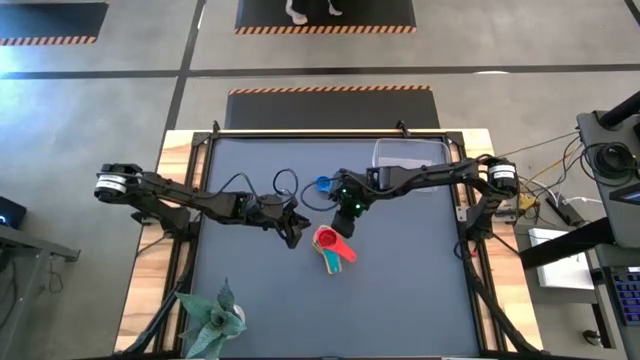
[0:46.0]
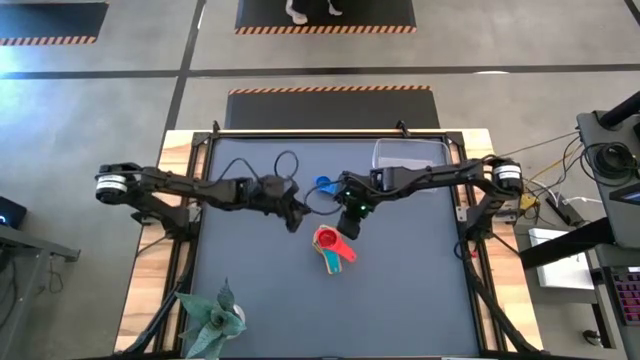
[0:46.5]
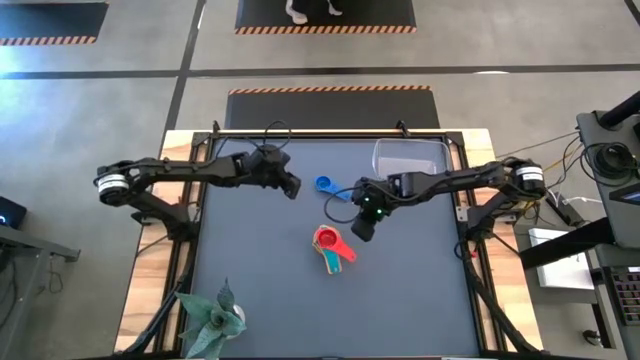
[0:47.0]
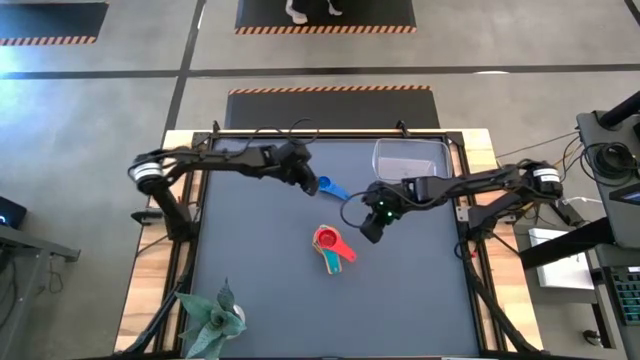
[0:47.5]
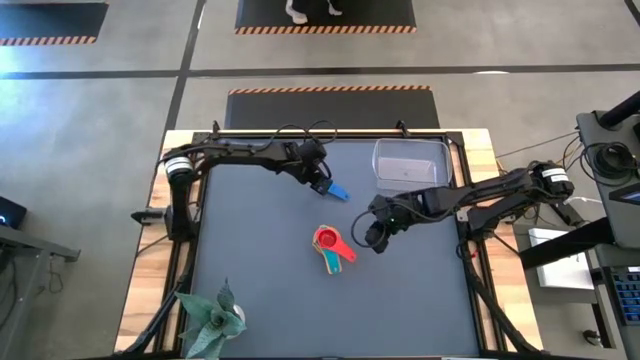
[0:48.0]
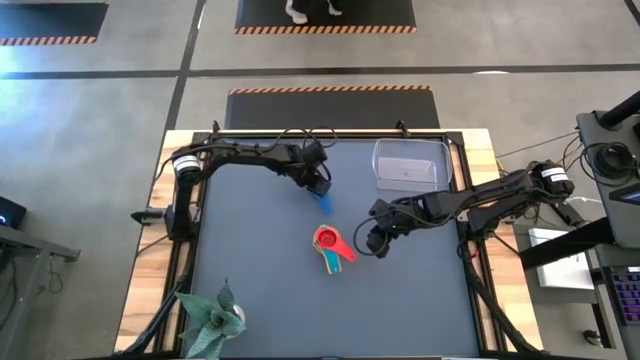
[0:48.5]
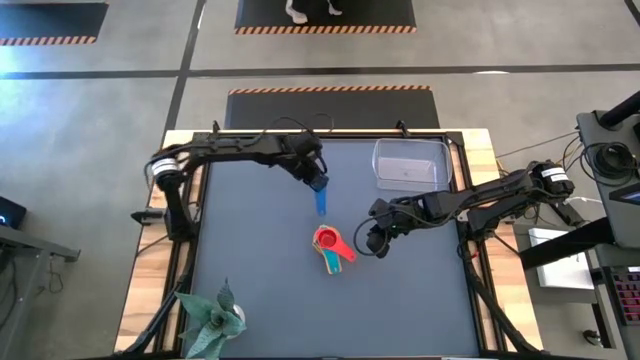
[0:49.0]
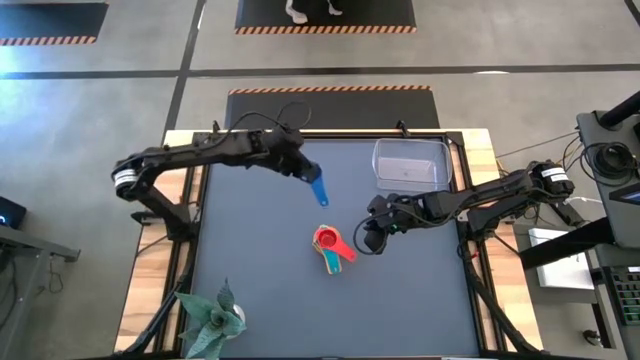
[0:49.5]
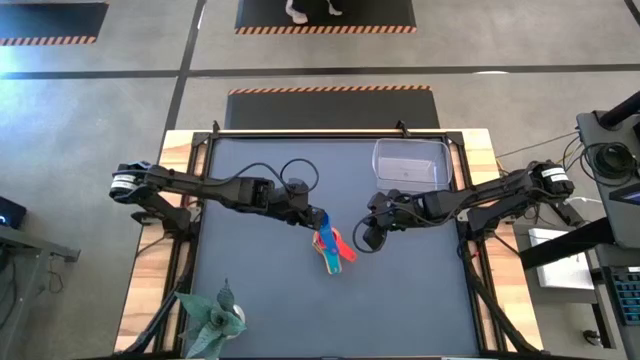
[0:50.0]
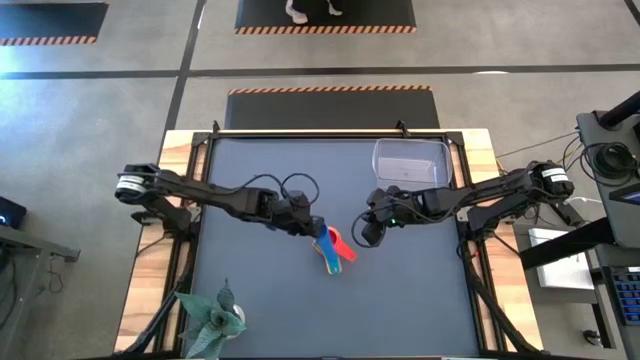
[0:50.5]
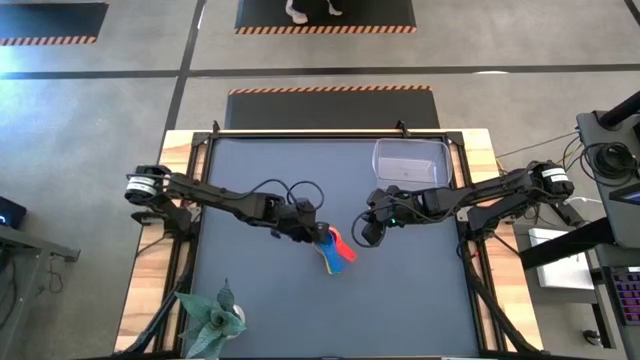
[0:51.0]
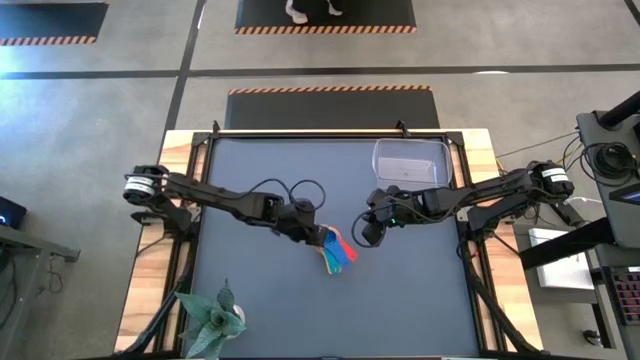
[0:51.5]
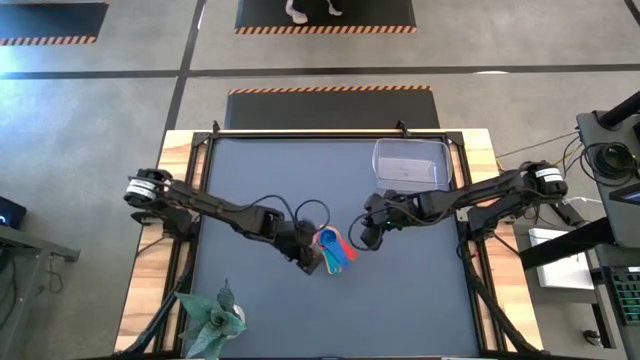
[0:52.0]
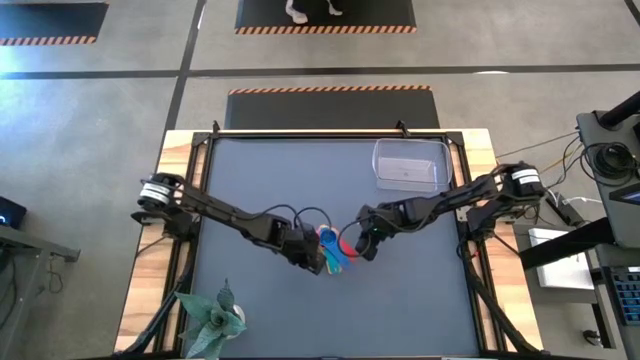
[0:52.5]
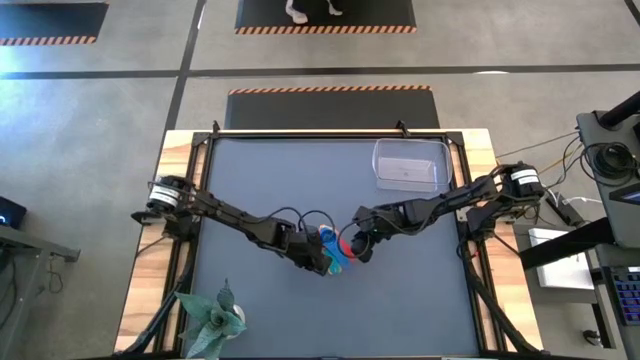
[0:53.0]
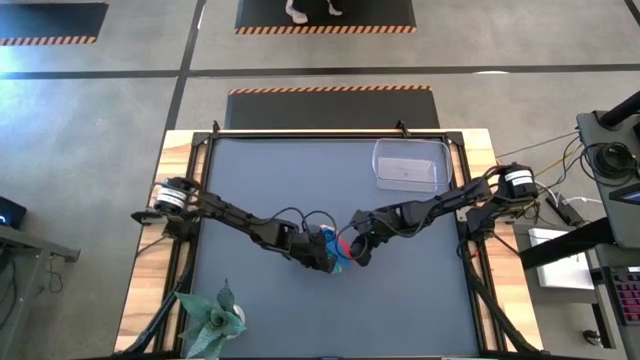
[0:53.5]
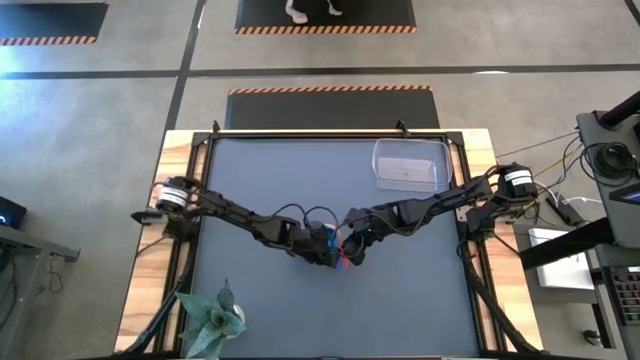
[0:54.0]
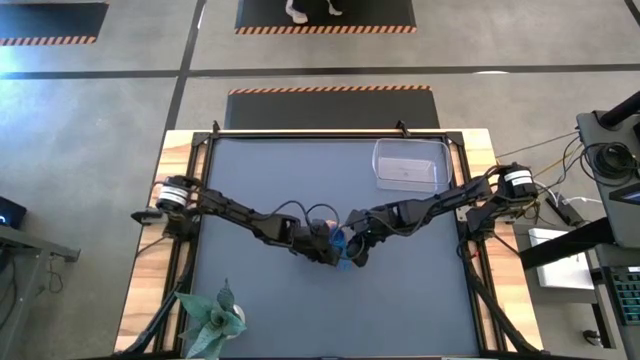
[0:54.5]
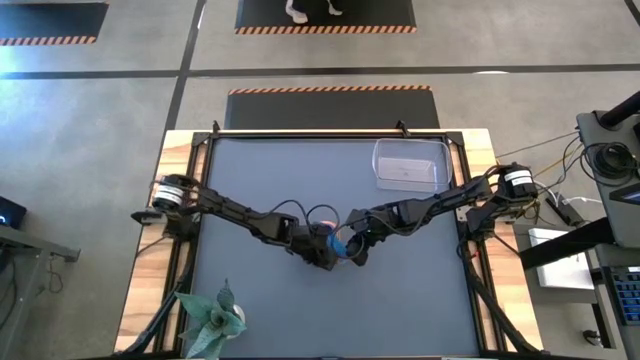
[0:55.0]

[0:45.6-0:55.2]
Task: Nest measuring cups in basket
Stack the blue measuring cup on top of the red measuring cup

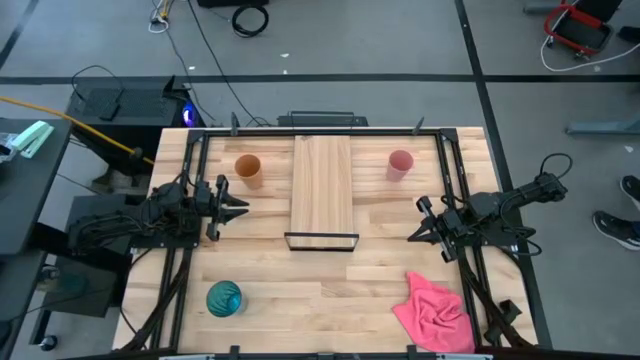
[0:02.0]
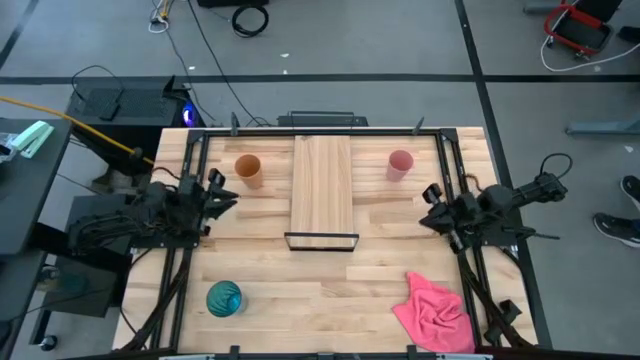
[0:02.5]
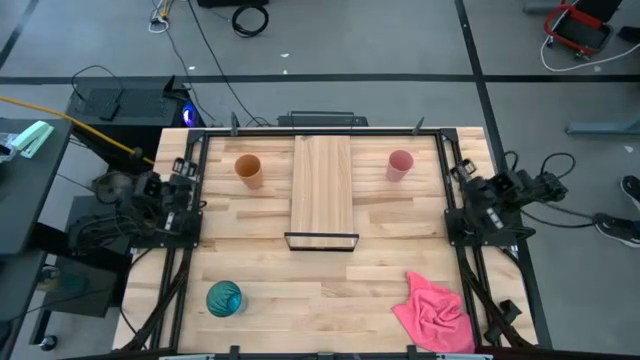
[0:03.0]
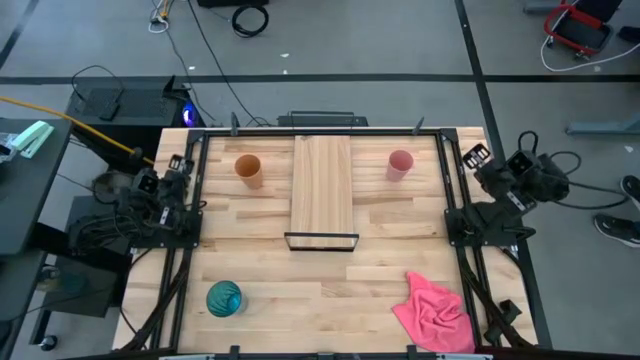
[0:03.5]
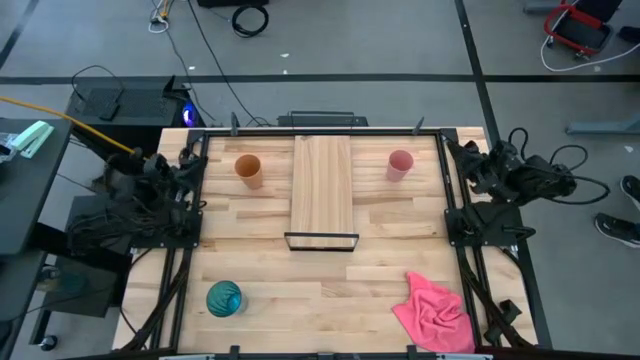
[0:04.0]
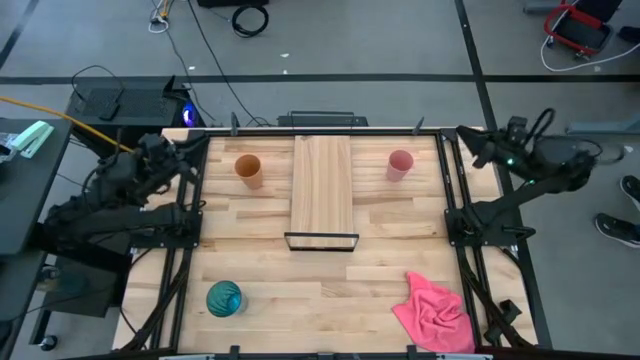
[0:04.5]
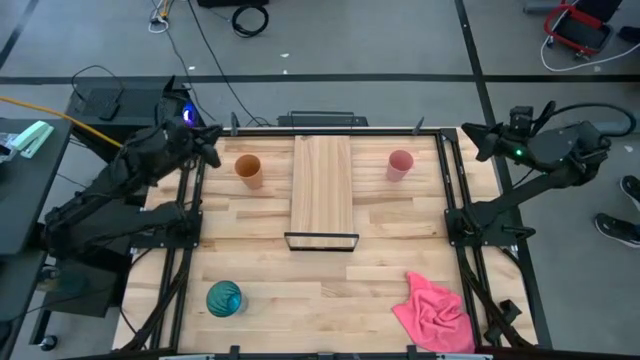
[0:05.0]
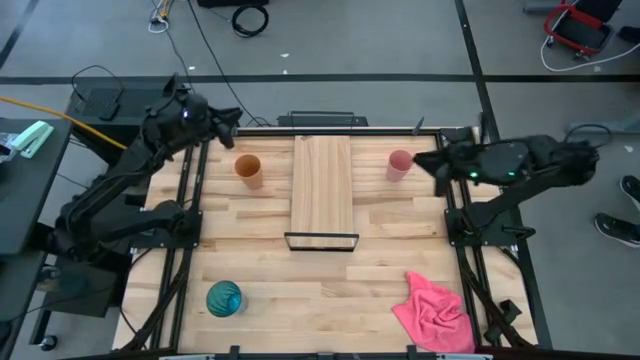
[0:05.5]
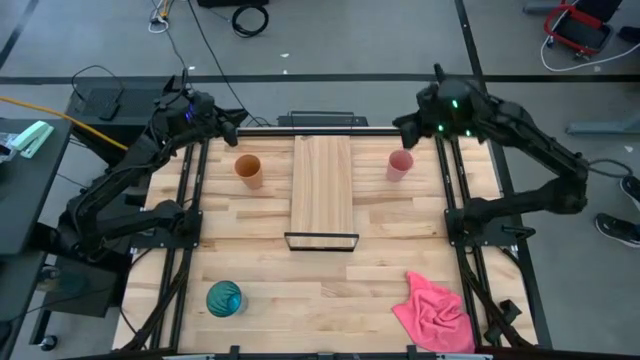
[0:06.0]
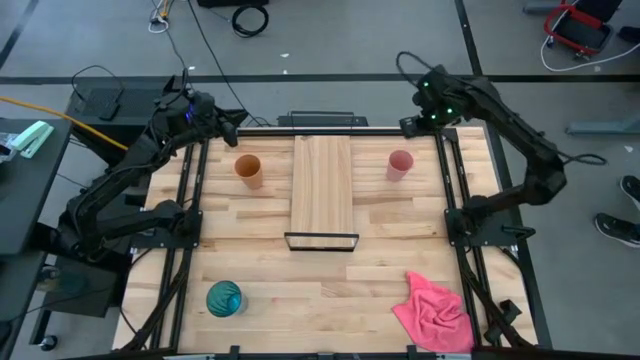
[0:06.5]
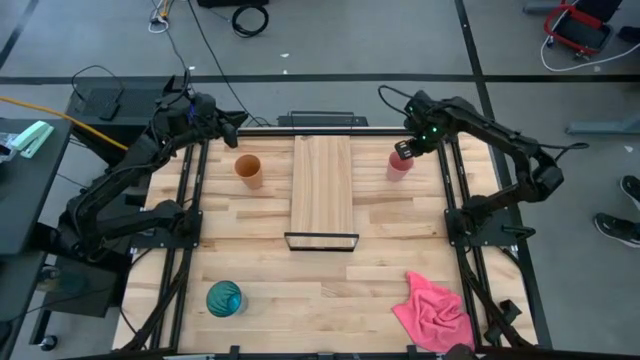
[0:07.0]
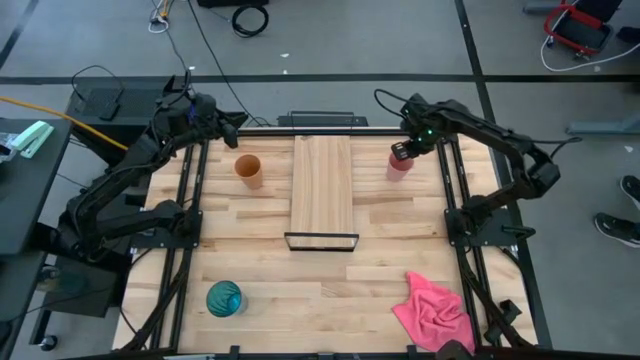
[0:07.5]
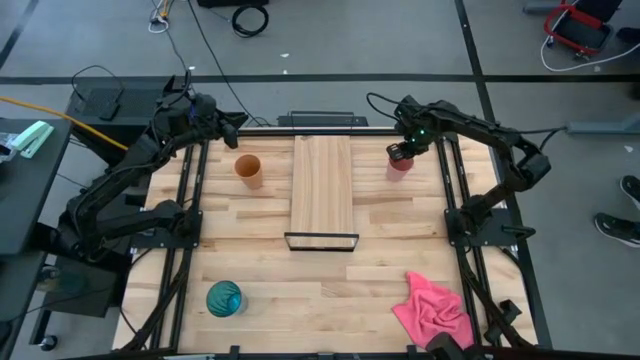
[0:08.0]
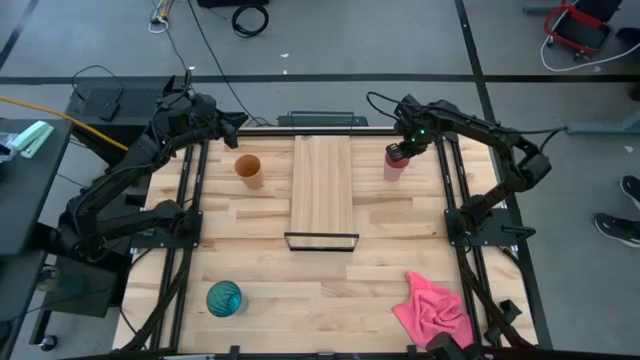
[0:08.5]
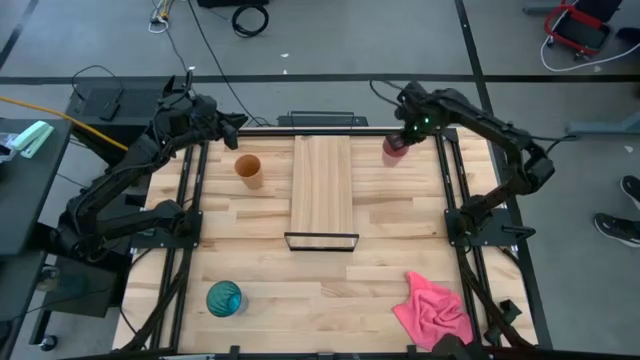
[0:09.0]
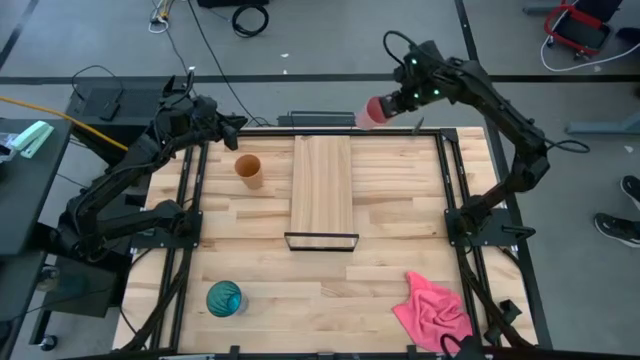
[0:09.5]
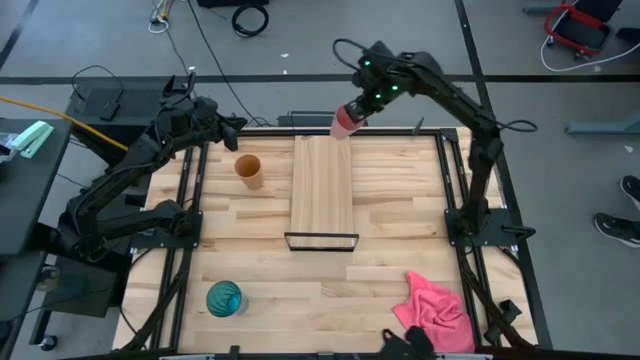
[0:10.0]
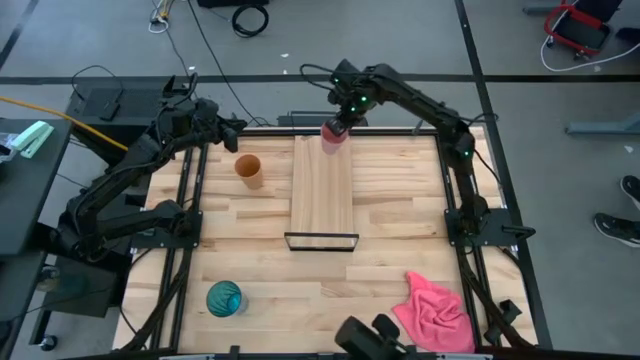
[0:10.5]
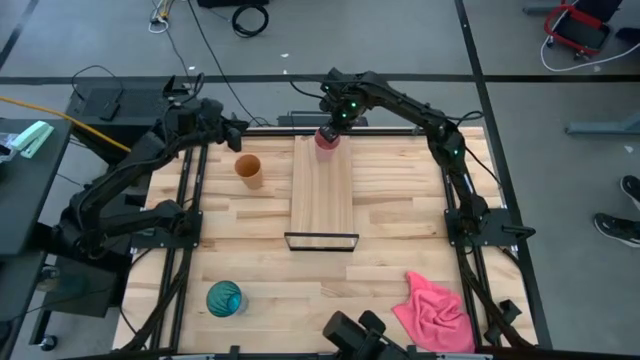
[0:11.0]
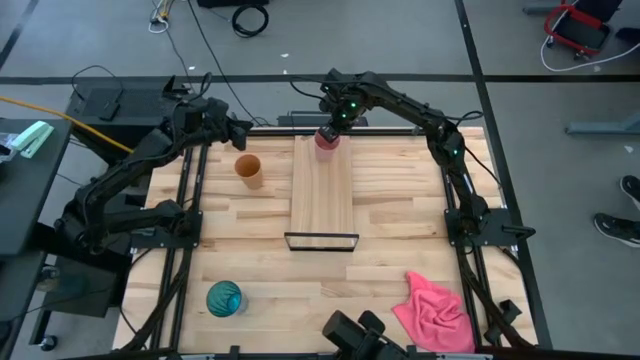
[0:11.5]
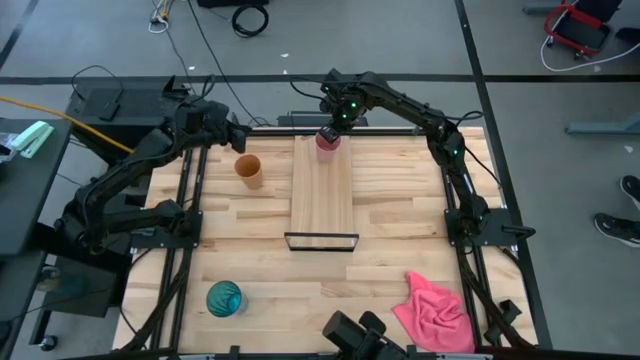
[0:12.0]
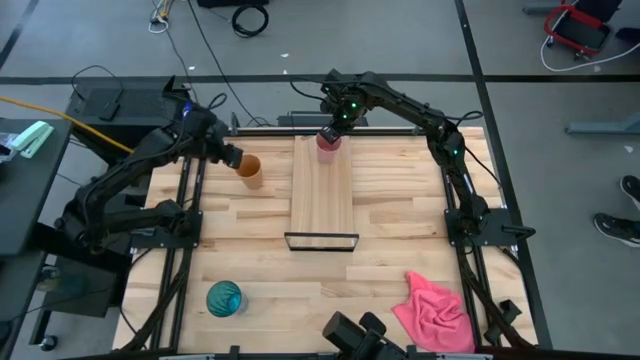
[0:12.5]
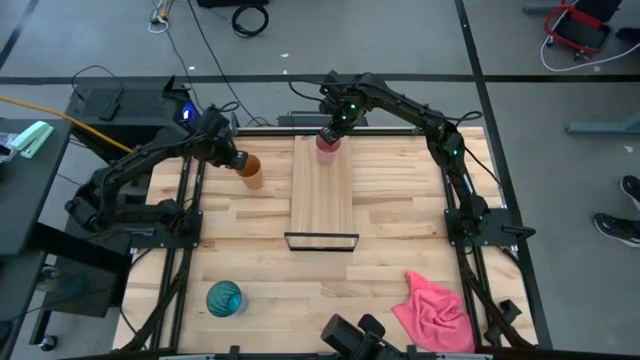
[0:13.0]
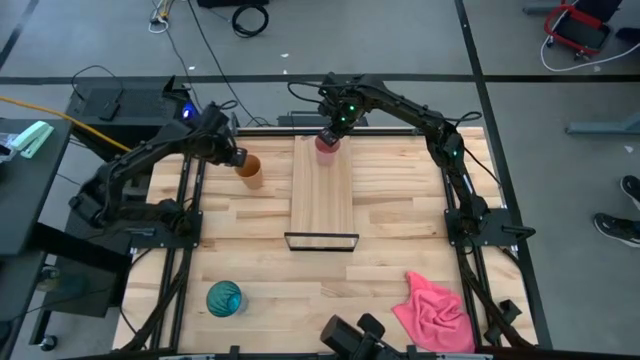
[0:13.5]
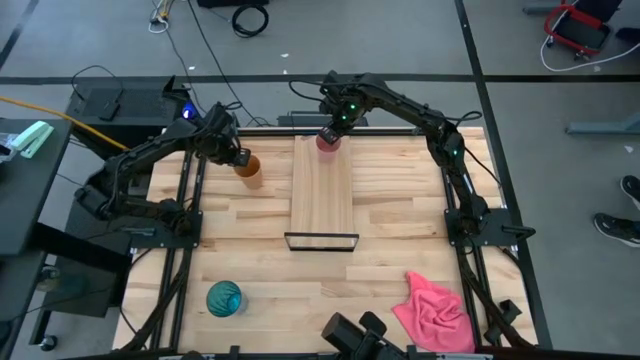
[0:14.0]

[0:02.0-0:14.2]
Task: Stack small to large cups/mugs on shelf
Put the pink cup on the shelf
